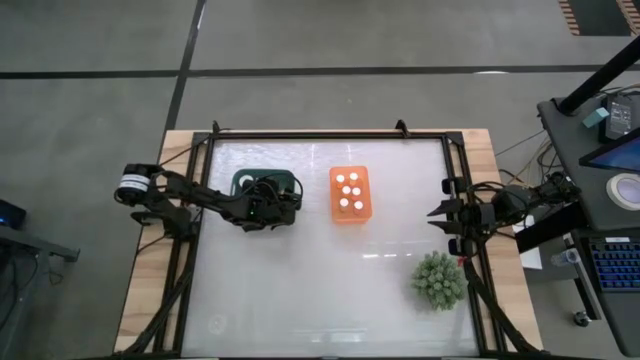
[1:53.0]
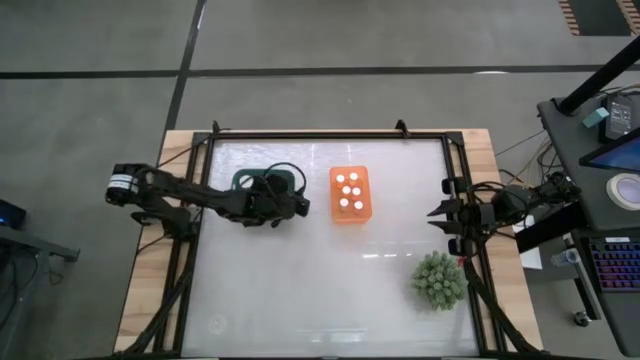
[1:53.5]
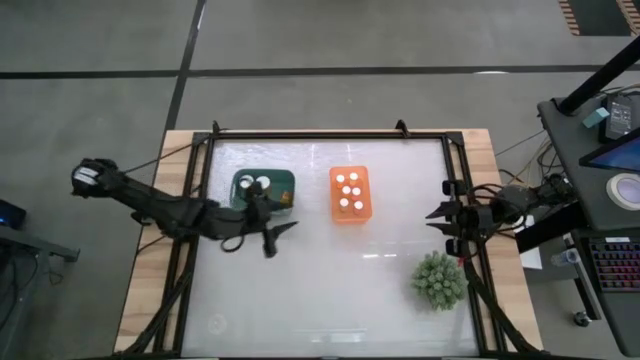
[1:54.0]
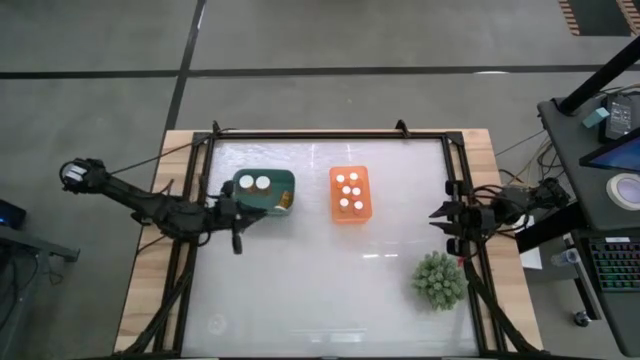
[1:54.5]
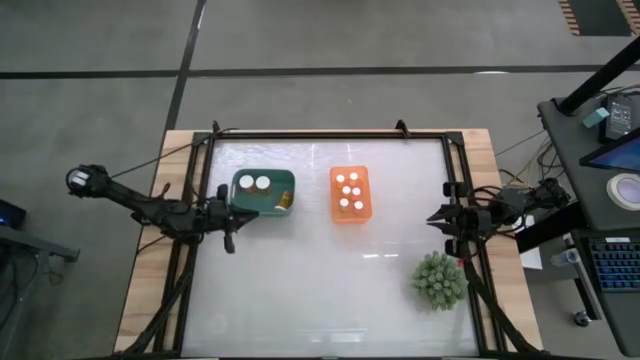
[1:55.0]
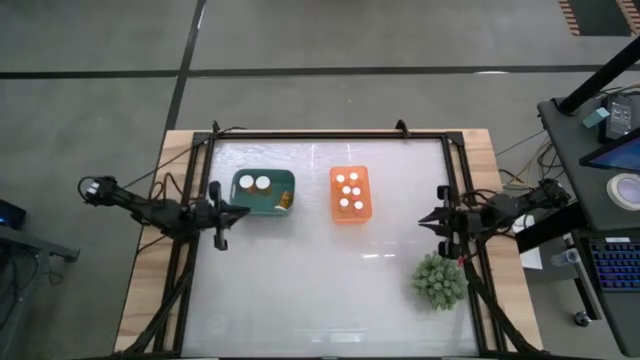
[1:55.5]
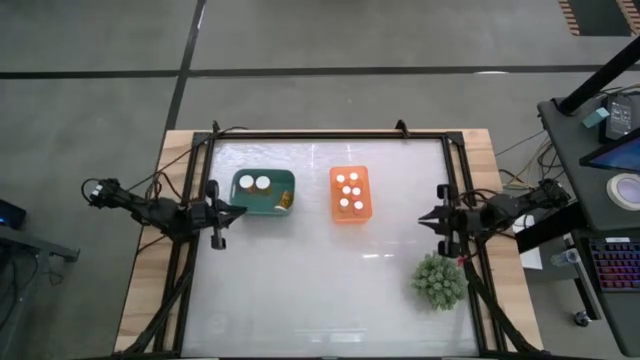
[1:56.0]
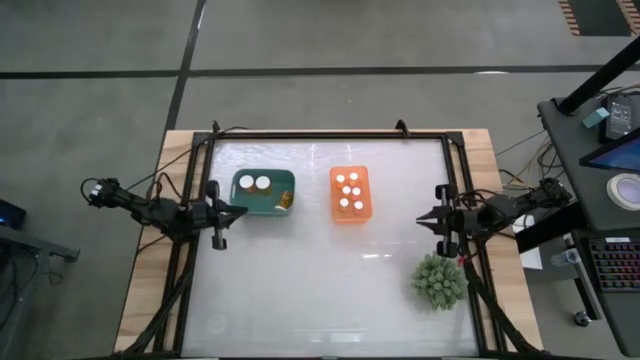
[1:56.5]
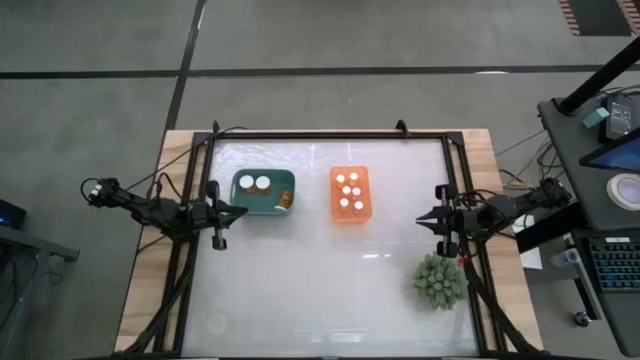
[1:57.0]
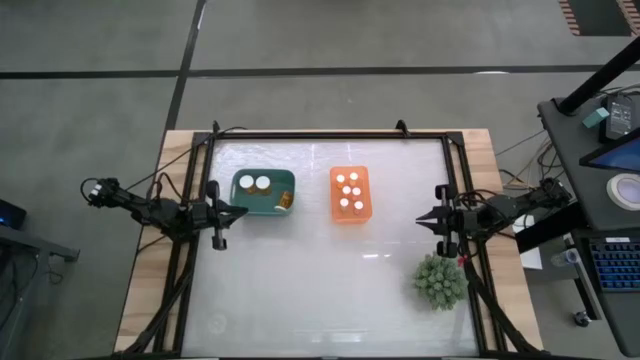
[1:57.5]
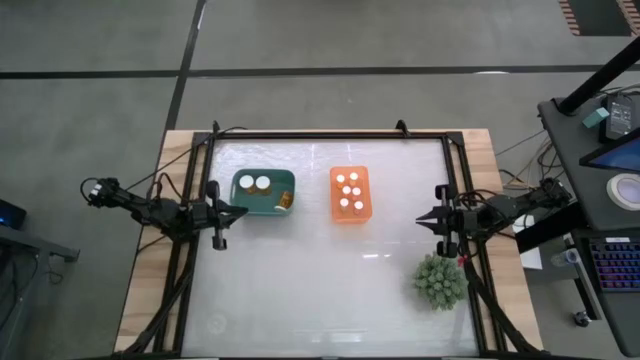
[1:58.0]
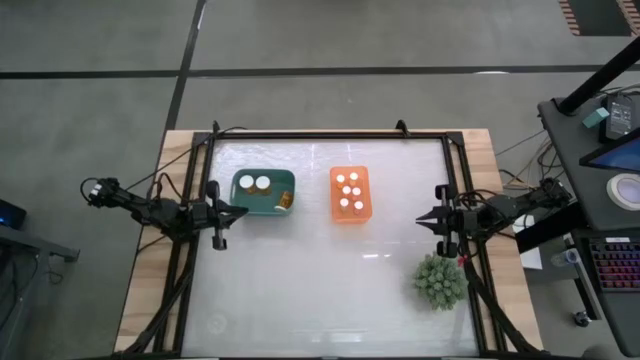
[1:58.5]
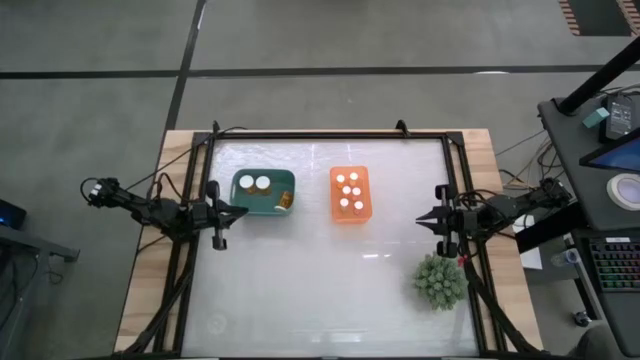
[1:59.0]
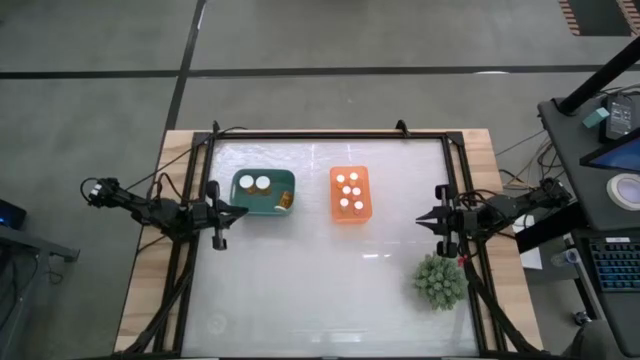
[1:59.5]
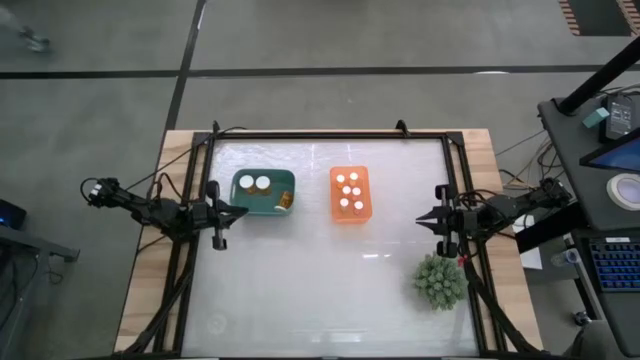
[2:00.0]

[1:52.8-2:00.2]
Task: Pick and place medicine bottles into bin by pill shape (circle, oval)
Return to Home Position

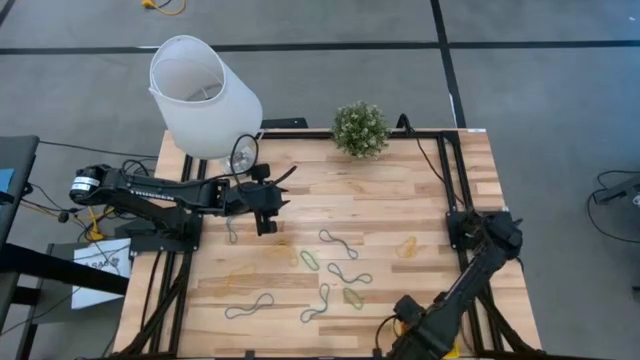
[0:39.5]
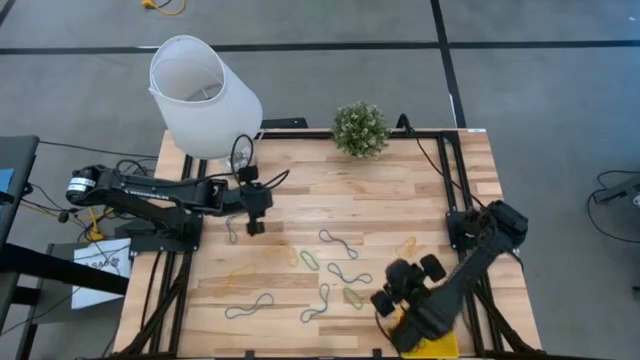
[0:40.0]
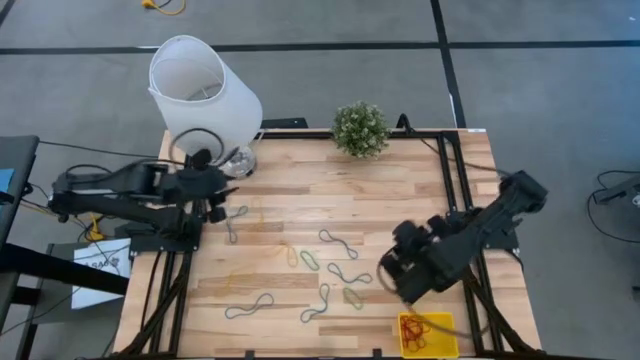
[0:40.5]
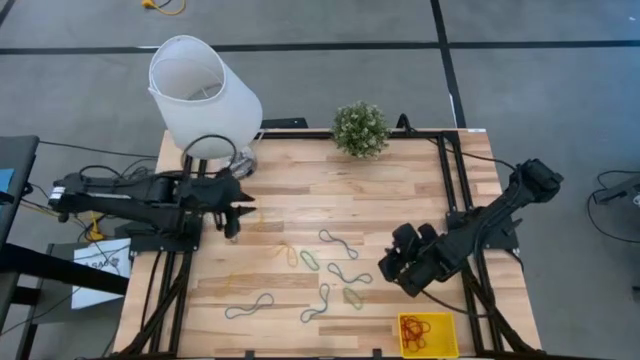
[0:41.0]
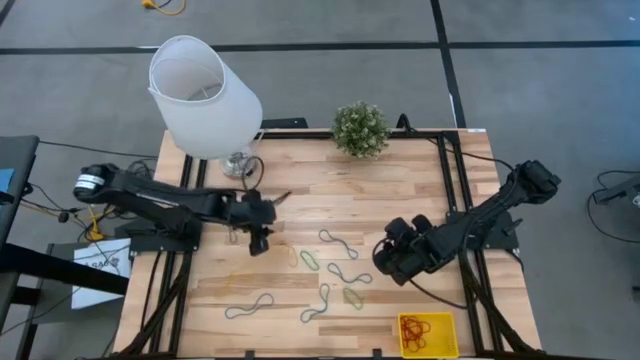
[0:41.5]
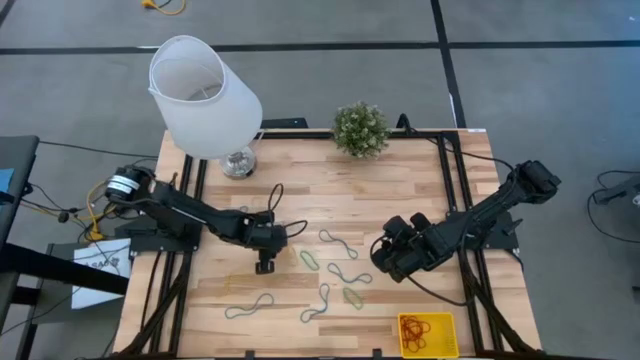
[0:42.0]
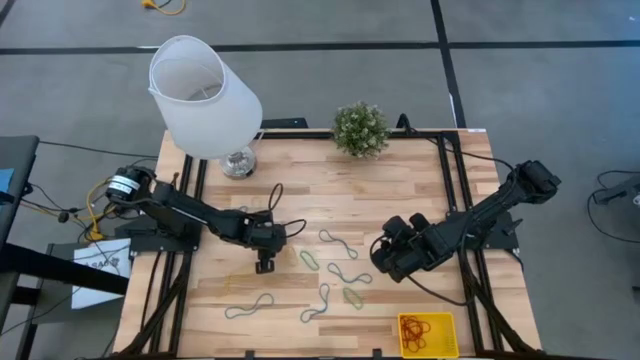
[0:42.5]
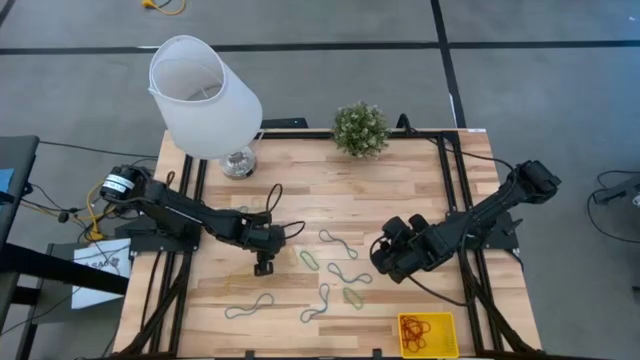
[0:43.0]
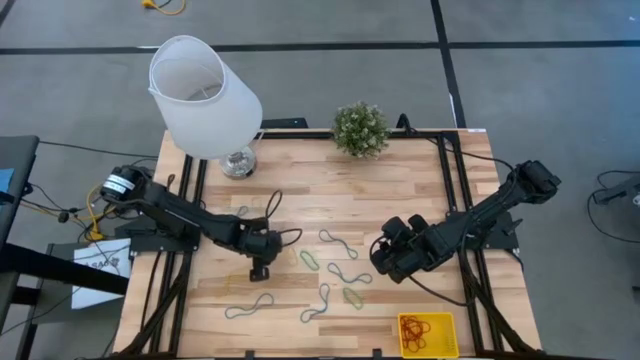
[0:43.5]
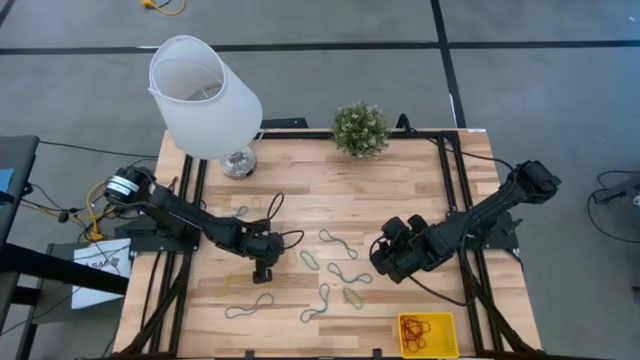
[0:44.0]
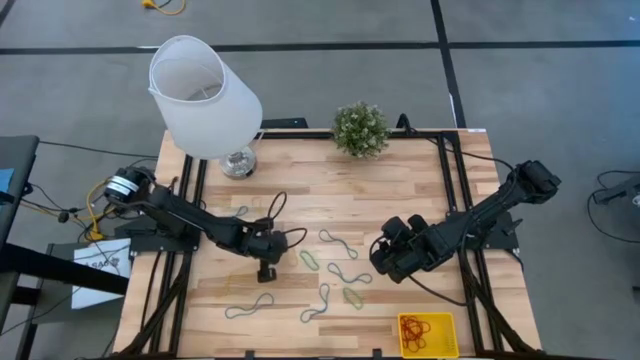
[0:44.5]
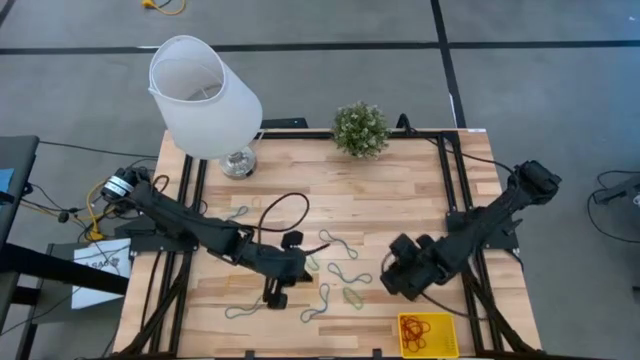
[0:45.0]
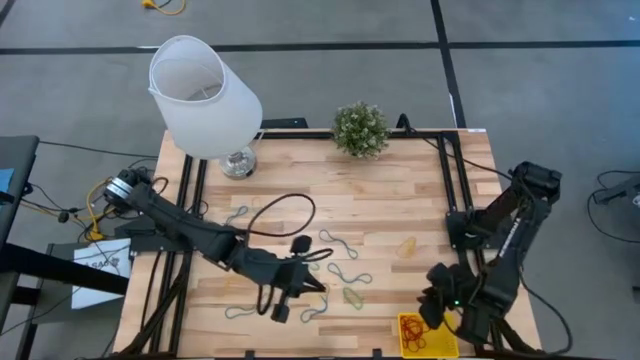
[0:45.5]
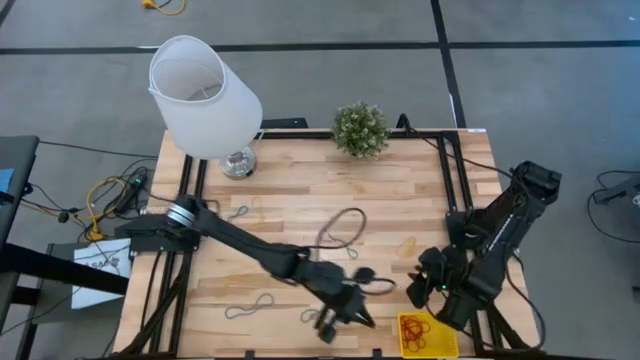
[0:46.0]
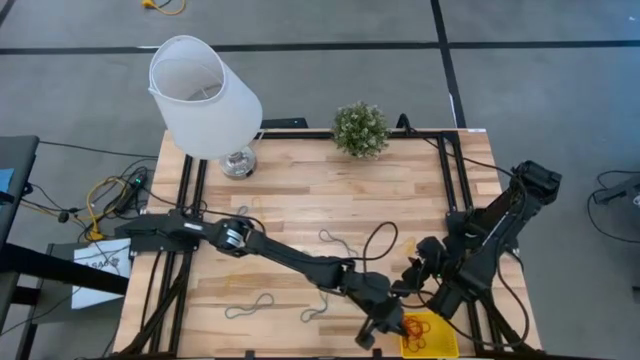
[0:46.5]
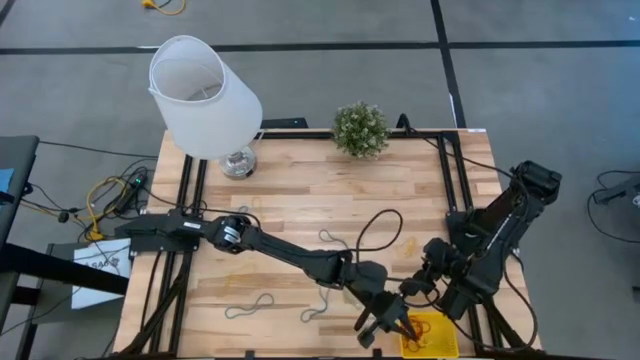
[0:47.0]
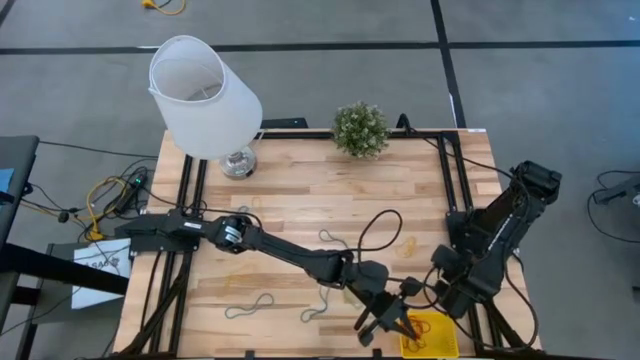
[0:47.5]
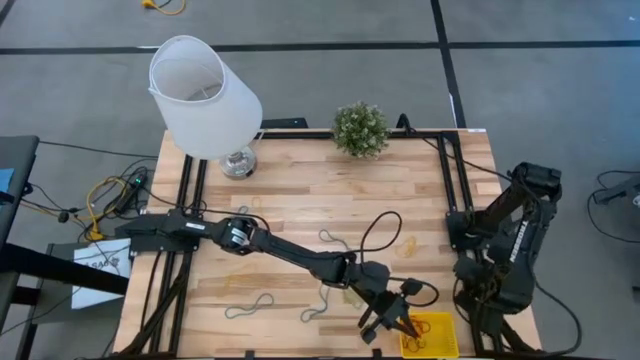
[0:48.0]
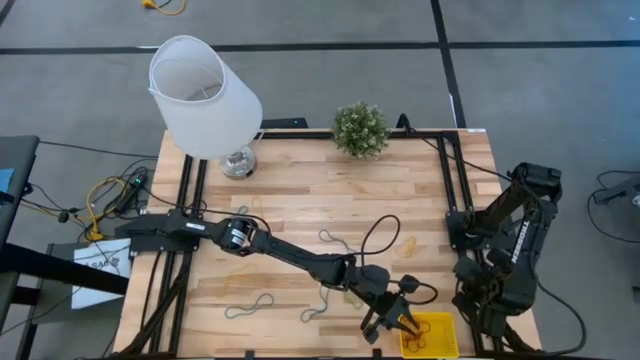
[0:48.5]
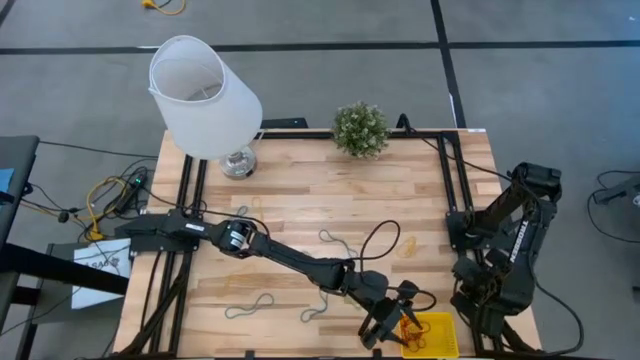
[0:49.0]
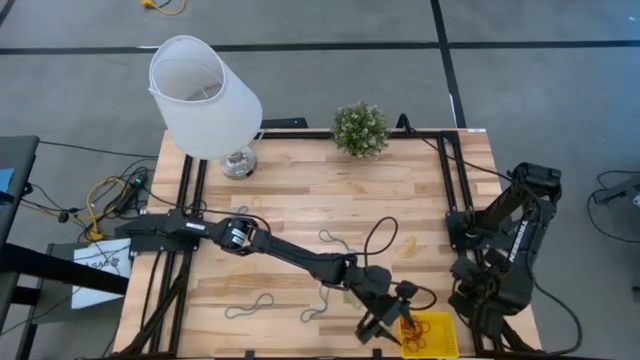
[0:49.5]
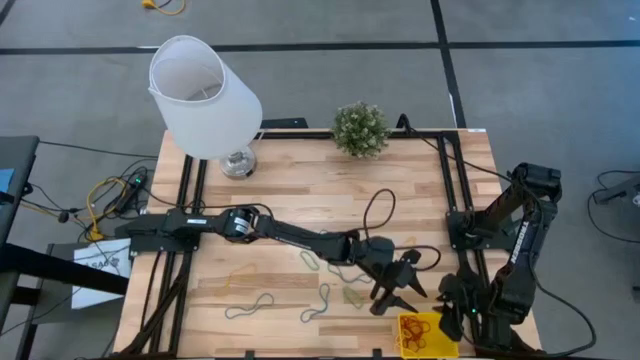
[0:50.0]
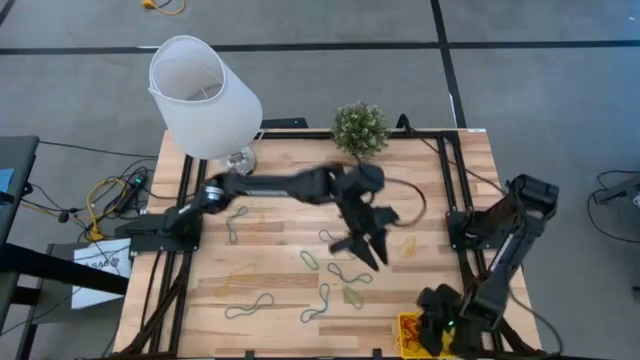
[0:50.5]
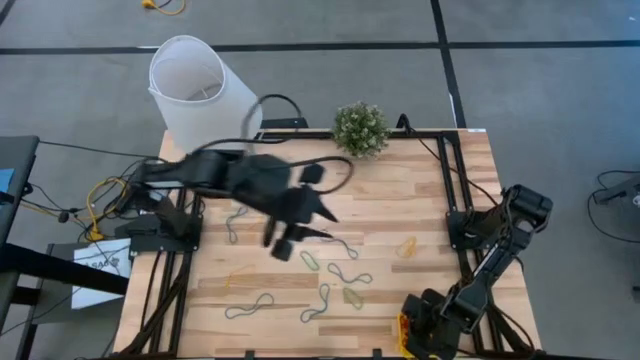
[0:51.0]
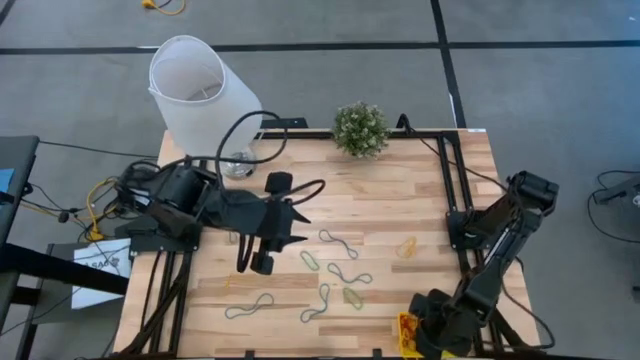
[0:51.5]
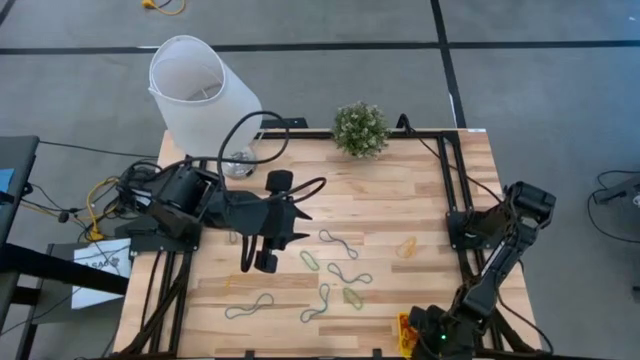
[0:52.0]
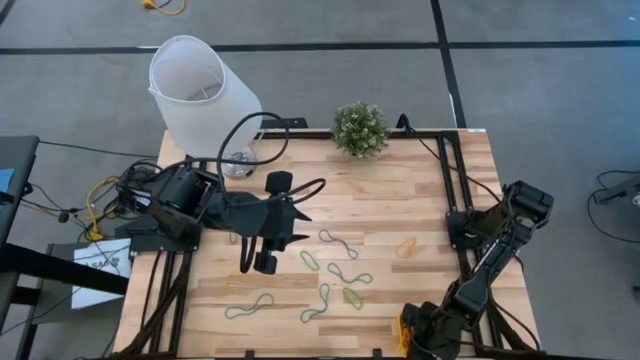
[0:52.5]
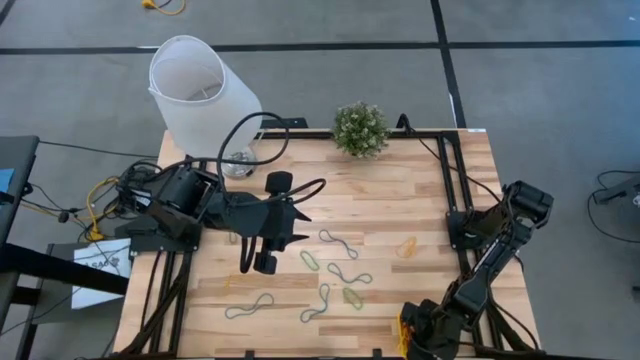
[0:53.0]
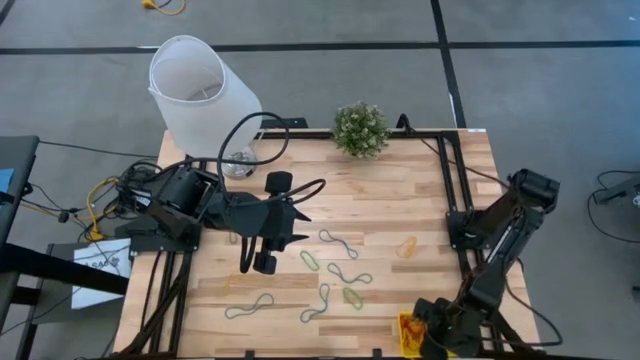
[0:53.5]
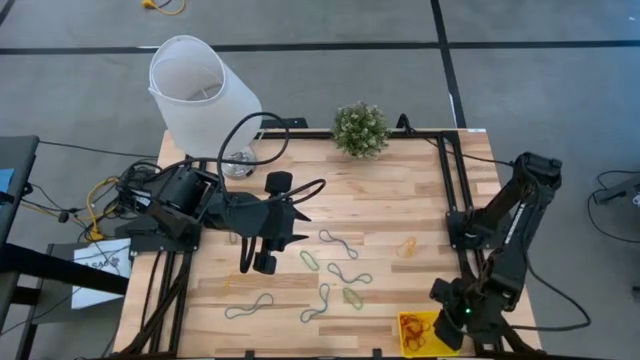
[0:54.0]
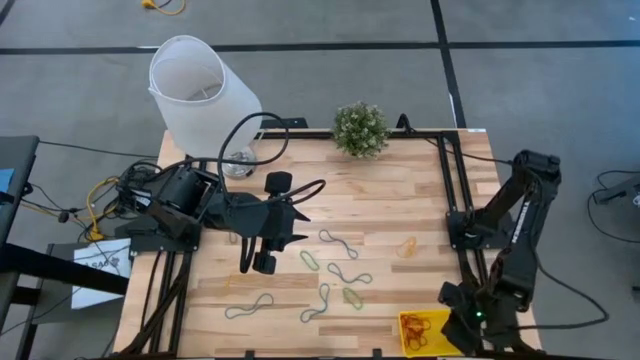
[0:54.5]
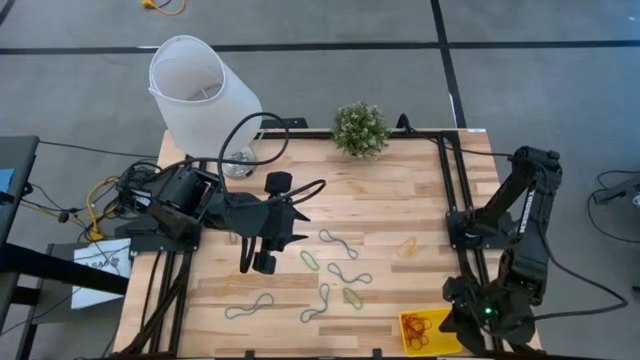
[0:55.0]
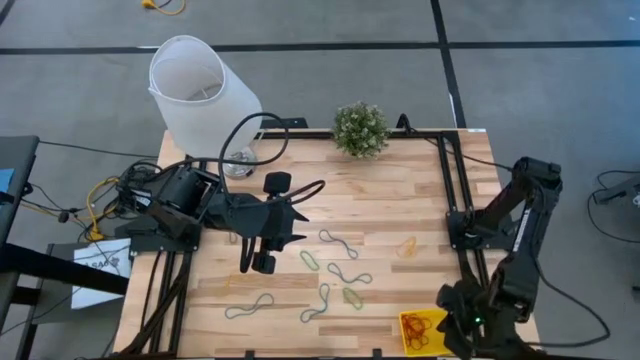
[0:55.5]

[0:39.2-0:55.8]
Task: Pick and place rubber bands into bin
Put the yellow rubber band into the yellow basket
